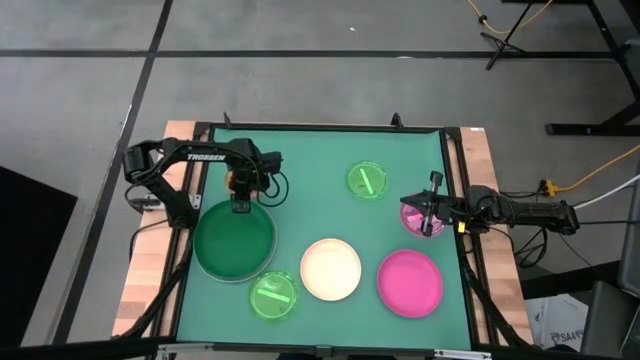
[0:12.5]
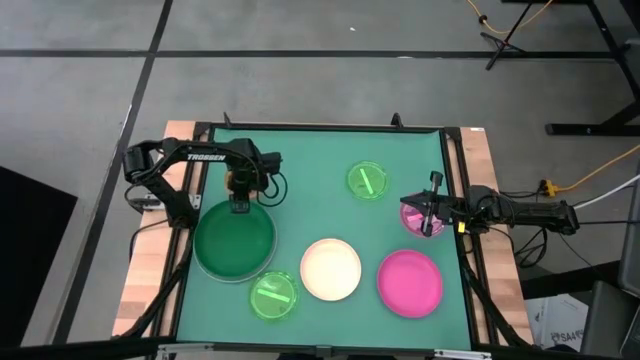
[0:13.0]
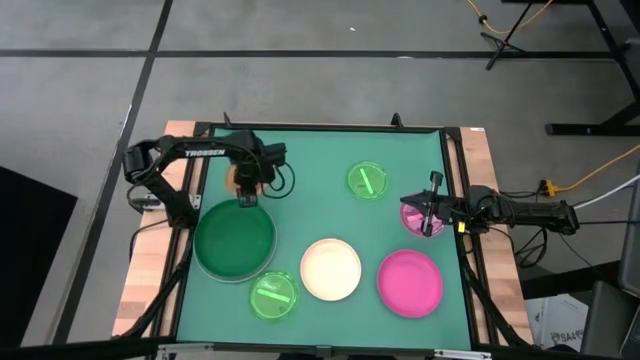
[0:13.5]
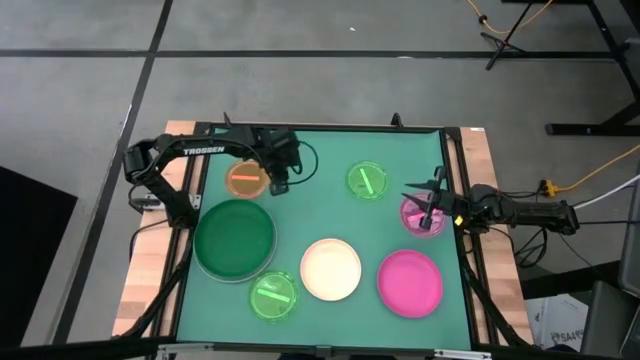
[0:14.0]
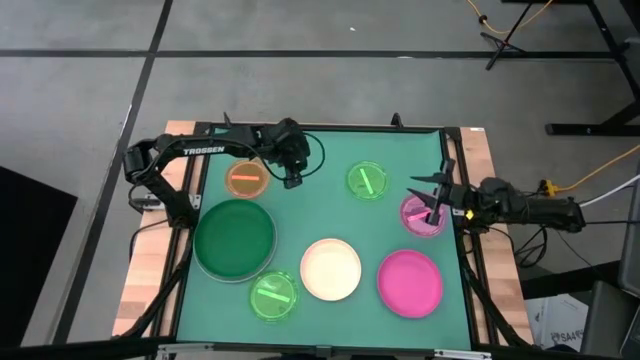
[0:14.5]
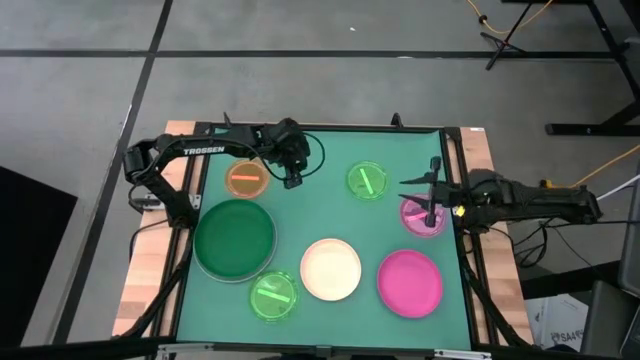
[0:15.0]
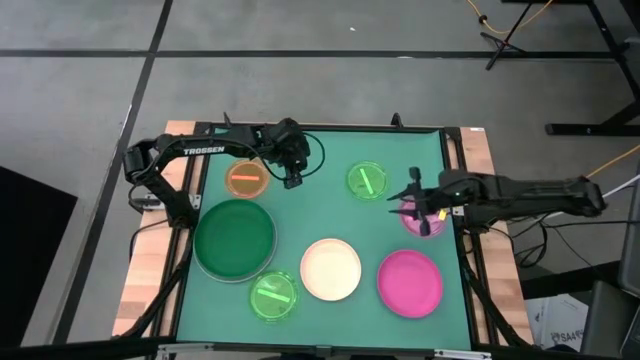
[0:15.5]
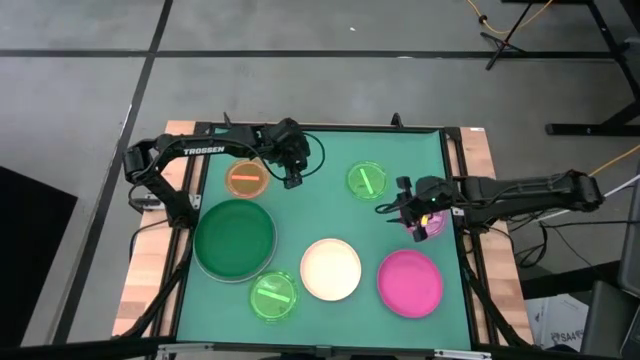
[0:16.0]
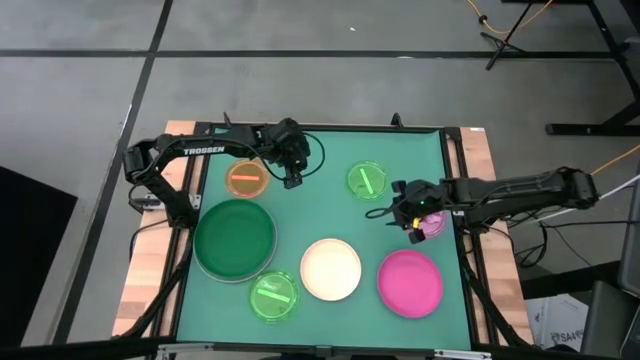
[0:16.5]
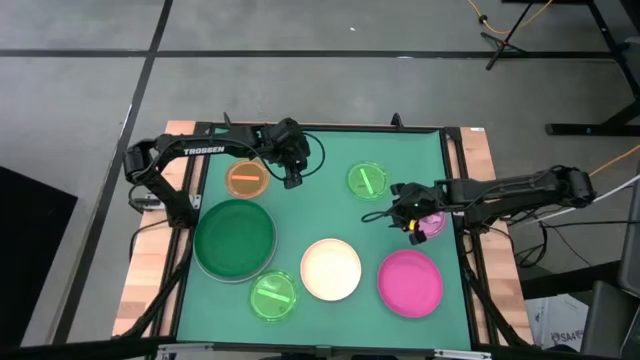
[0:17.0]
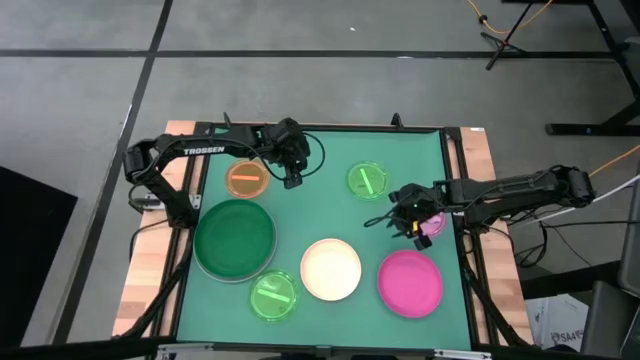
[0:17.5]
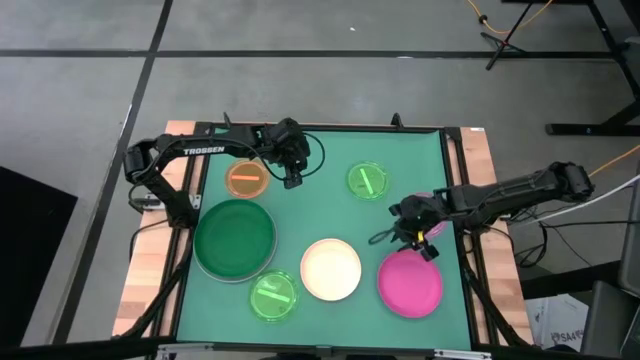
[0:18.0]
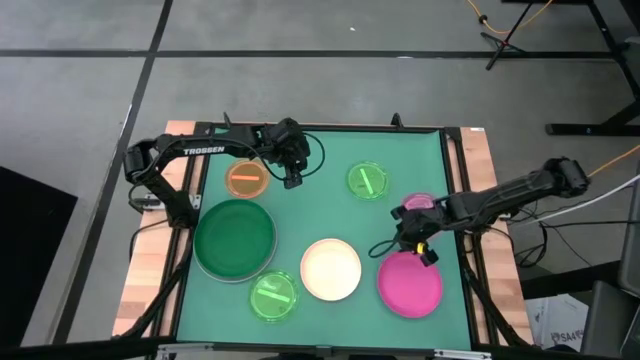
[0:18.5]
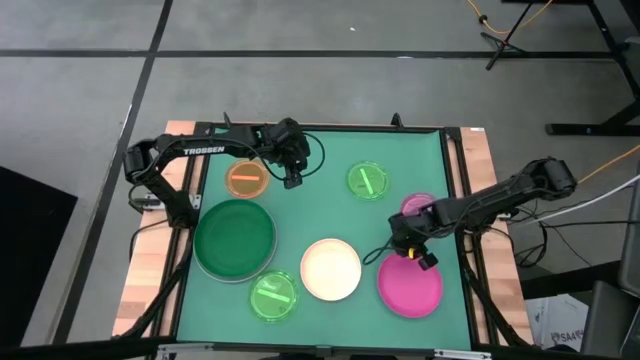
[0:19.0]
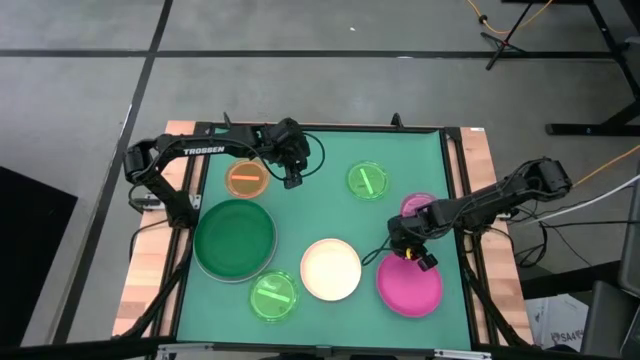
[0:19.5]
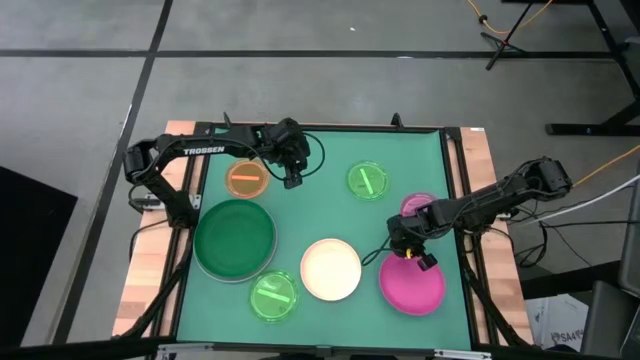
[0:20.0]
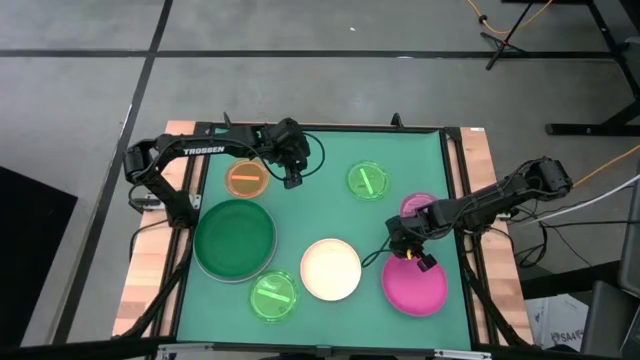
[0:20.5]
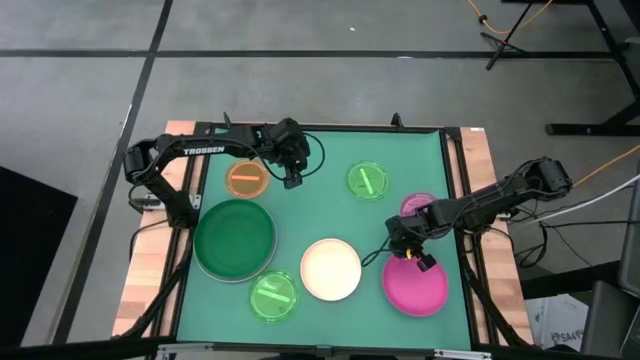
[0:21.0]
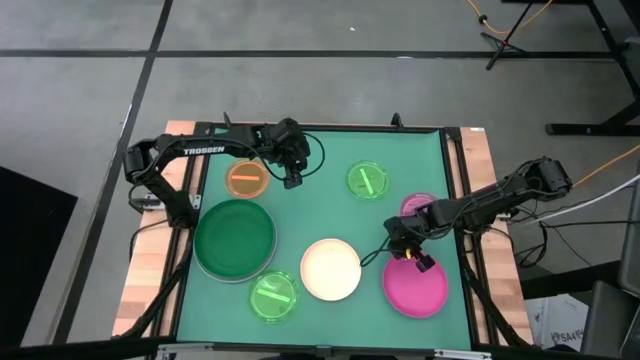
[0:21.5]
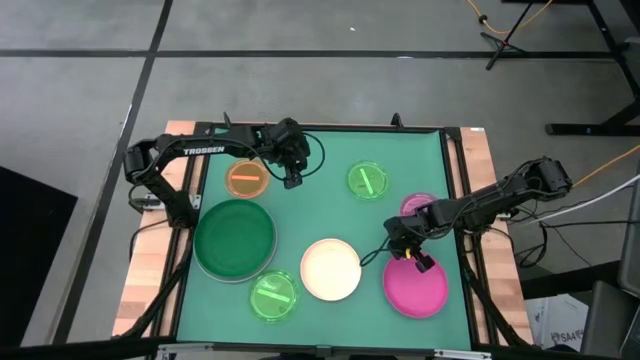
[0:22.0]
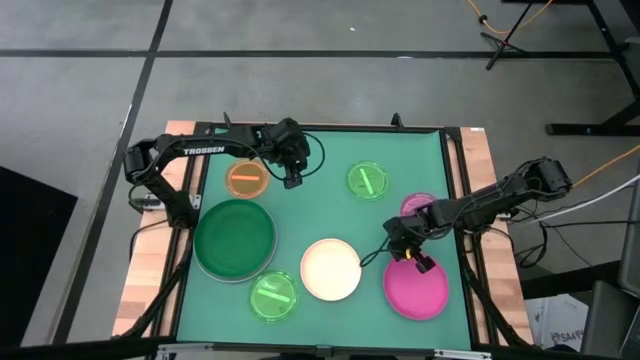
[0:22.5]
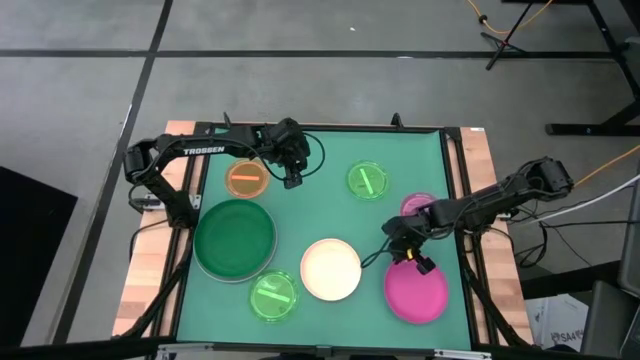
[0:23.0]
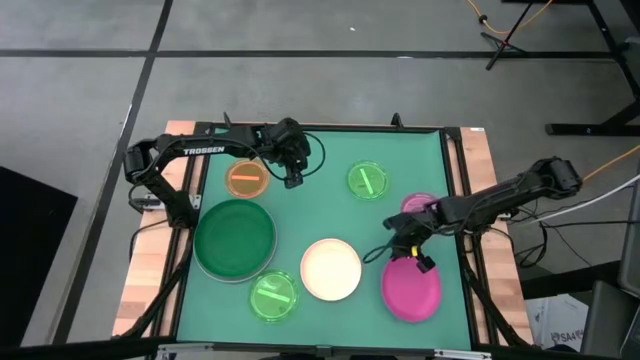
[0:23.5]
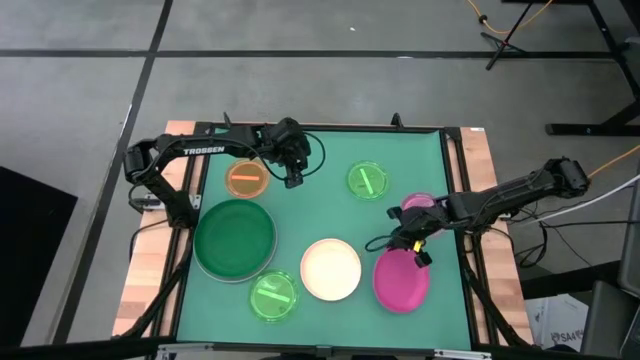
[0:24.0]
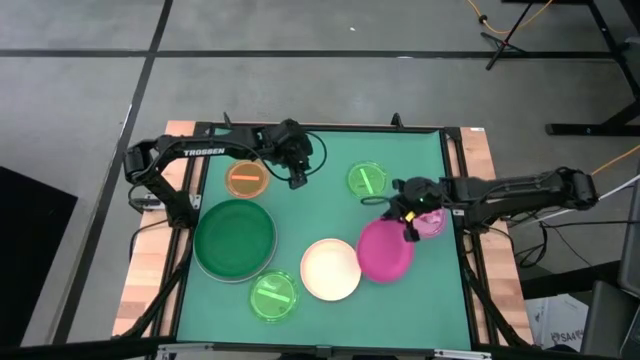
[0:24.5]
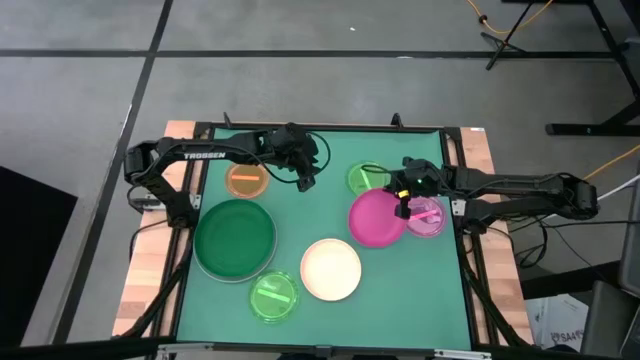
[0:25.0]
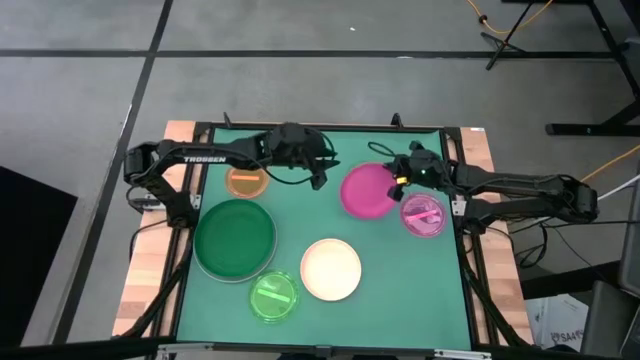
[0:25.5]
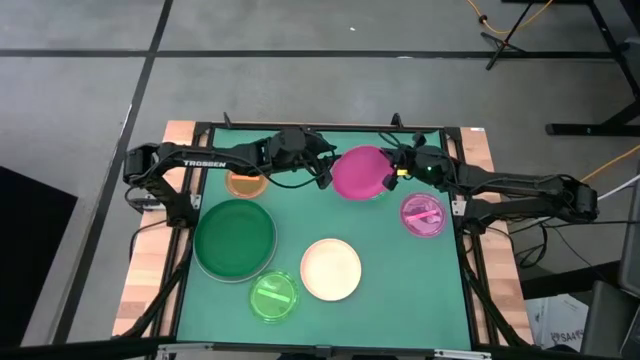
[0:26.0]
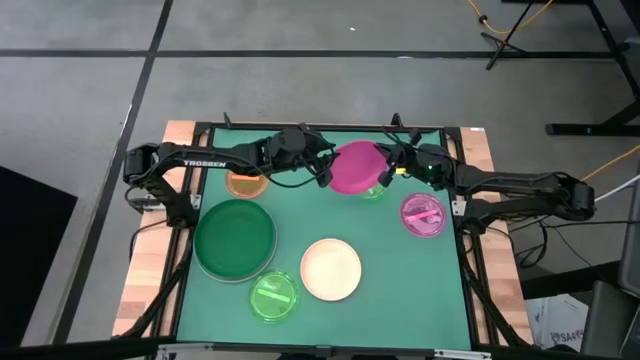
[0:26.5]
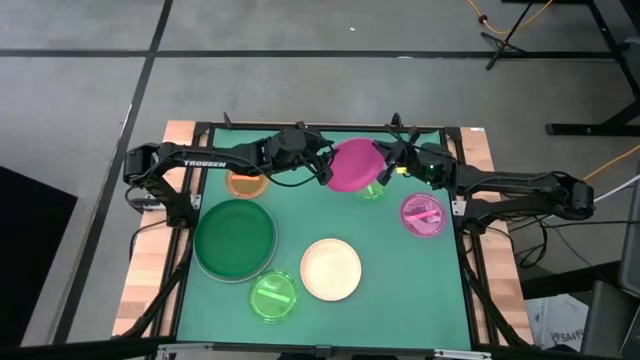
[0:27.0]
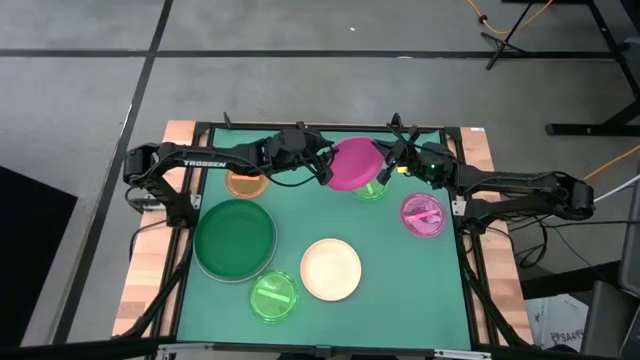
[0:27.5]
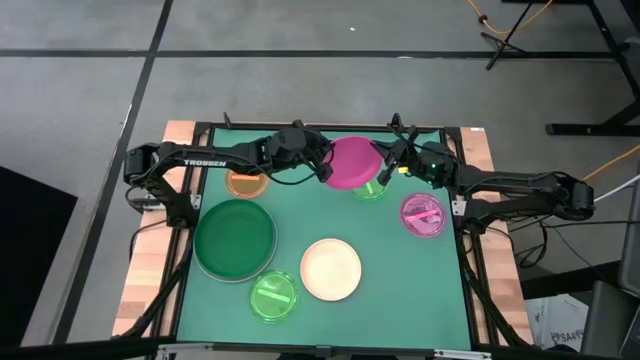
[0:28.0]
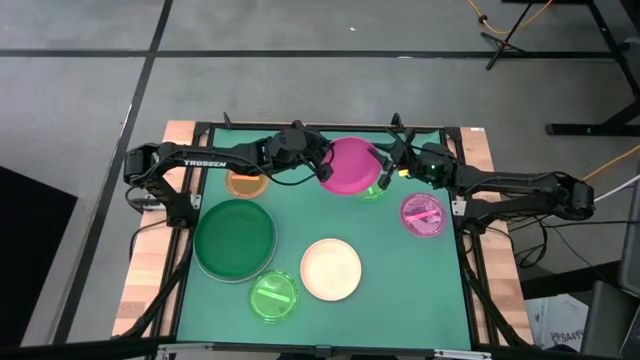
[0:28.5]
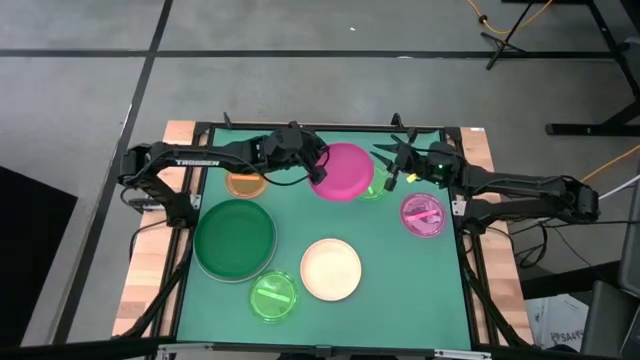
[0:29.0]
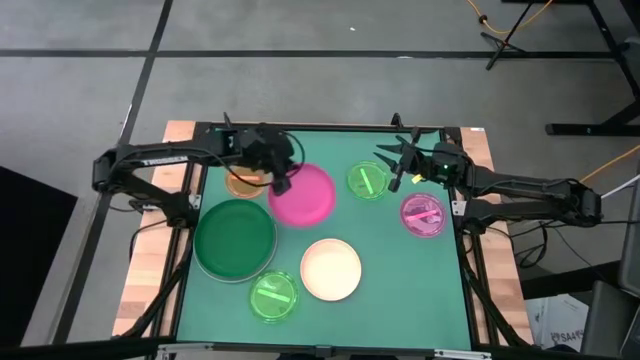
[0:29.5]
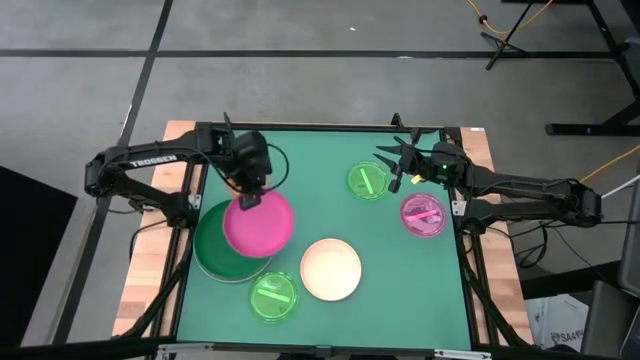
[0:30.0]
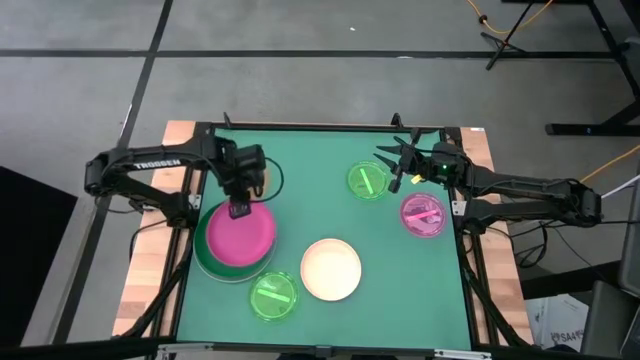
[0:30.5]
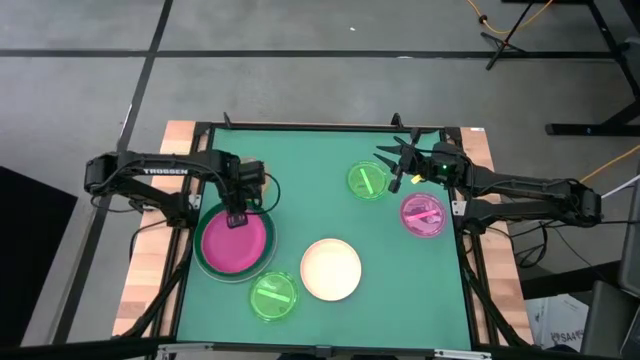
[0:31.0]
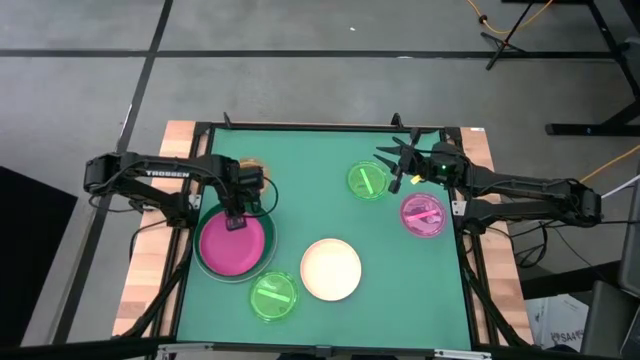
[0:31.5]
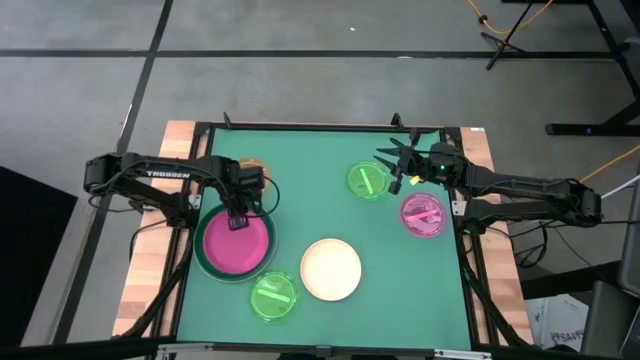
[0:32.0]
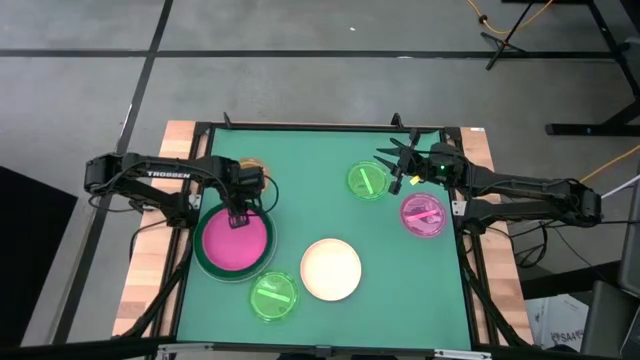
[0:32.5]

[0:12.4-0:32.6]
Task: Stack plastic plates
Stack the pink plate on top of the green plate
